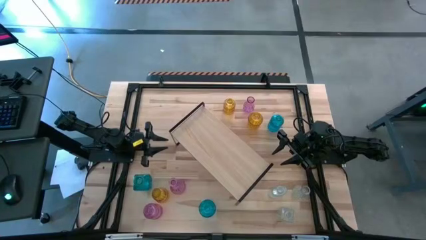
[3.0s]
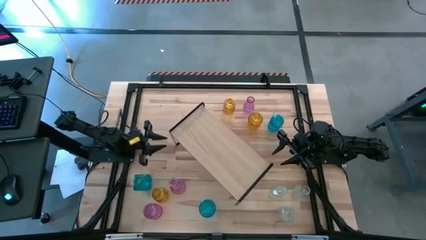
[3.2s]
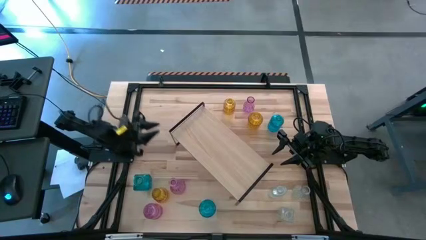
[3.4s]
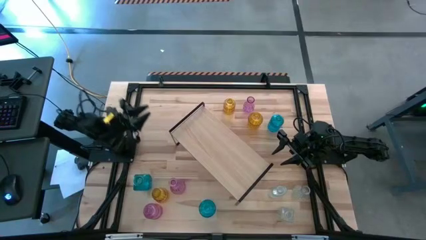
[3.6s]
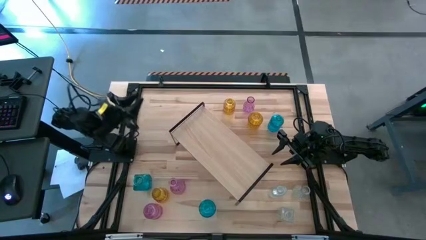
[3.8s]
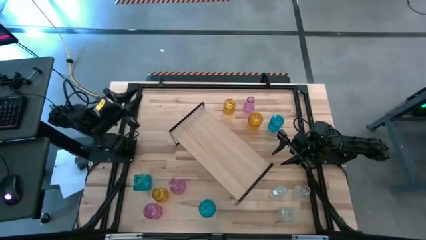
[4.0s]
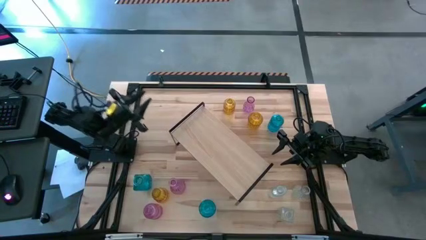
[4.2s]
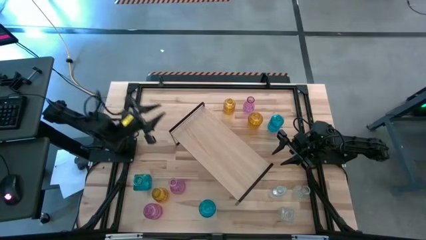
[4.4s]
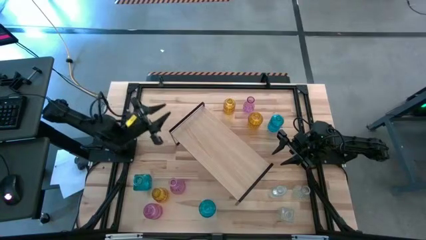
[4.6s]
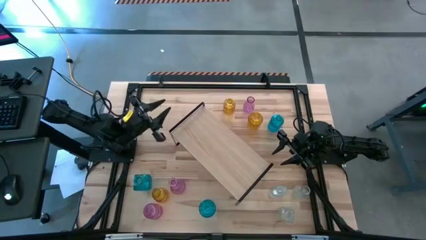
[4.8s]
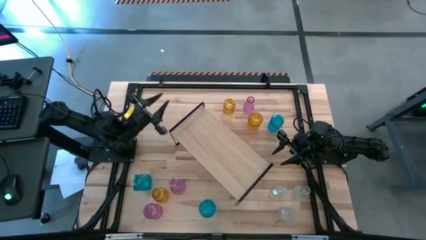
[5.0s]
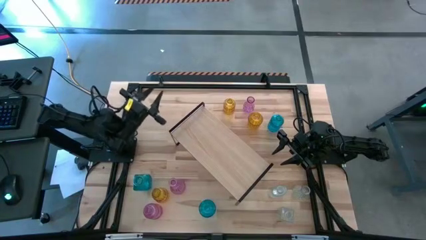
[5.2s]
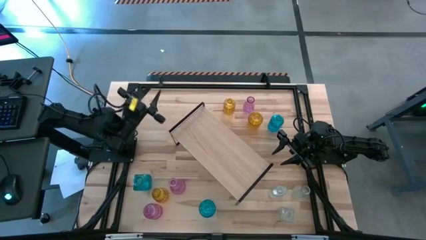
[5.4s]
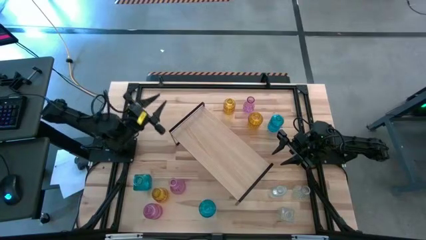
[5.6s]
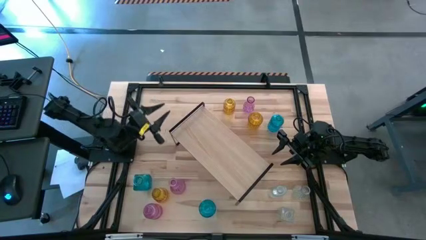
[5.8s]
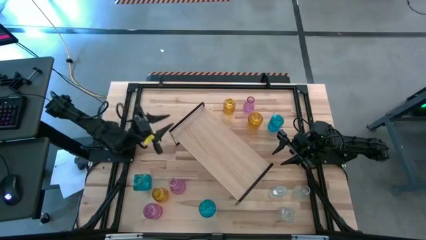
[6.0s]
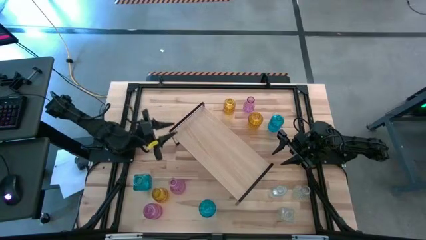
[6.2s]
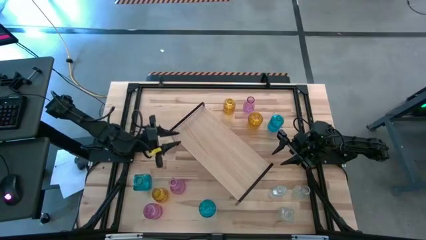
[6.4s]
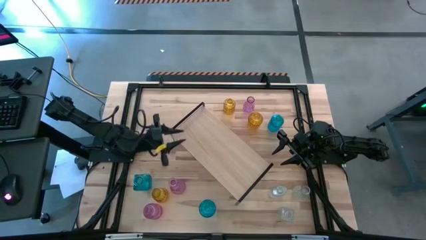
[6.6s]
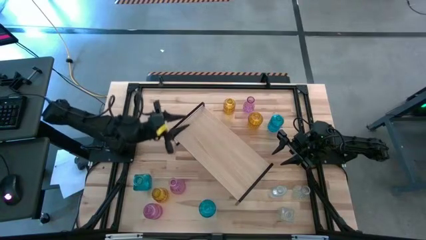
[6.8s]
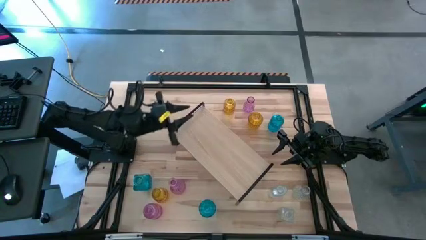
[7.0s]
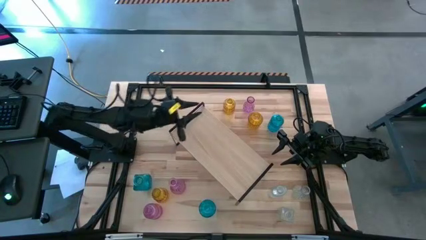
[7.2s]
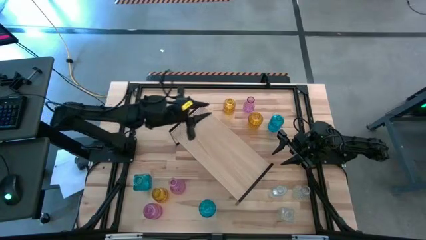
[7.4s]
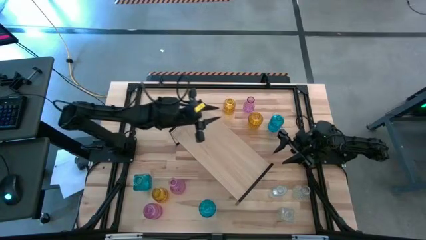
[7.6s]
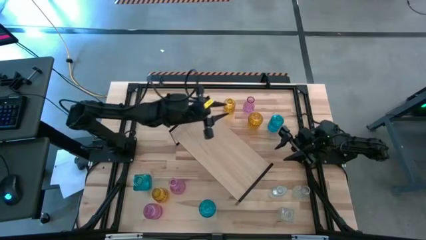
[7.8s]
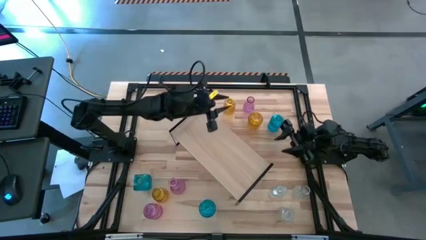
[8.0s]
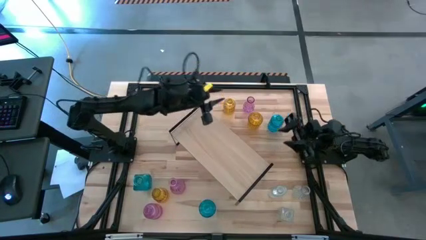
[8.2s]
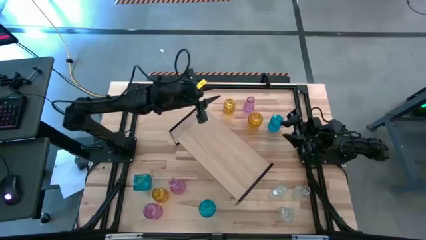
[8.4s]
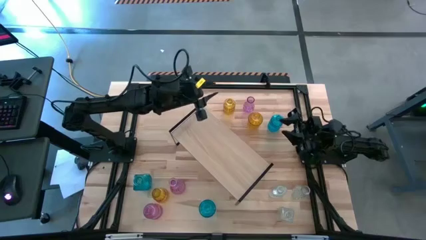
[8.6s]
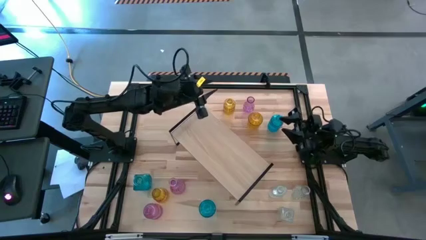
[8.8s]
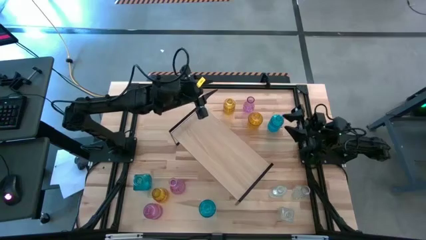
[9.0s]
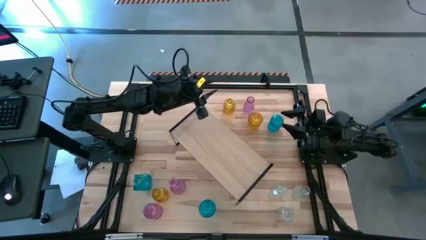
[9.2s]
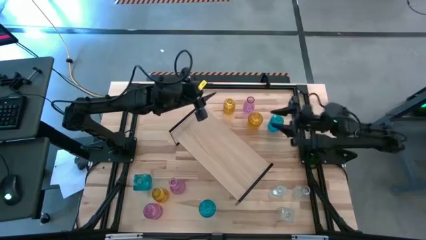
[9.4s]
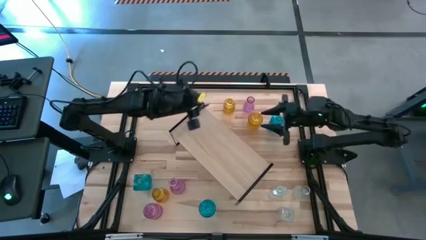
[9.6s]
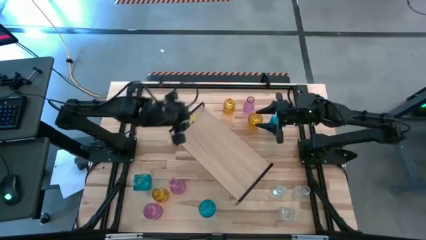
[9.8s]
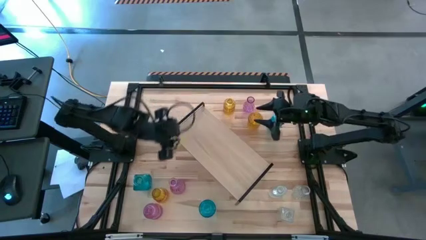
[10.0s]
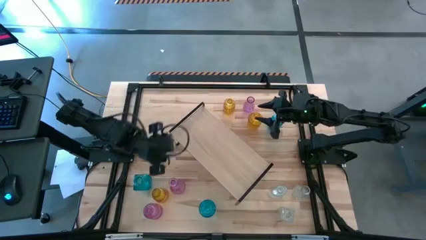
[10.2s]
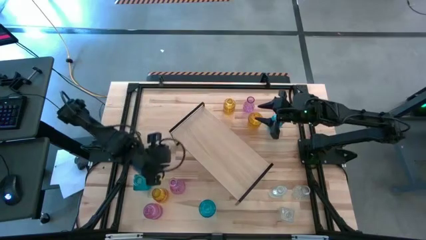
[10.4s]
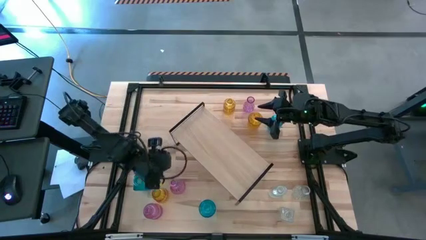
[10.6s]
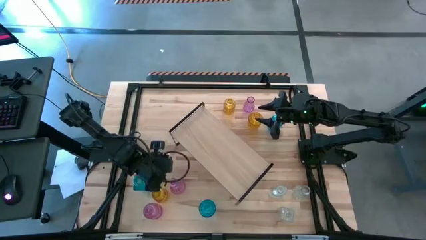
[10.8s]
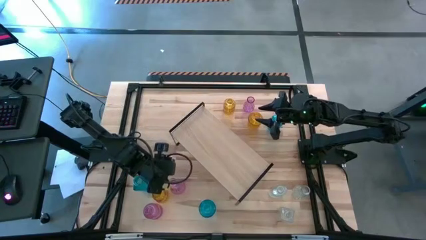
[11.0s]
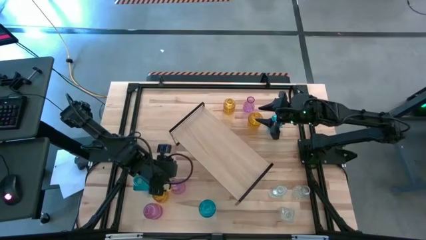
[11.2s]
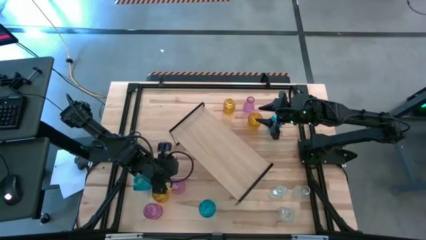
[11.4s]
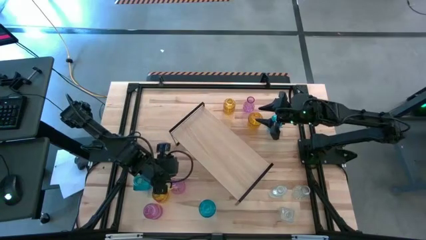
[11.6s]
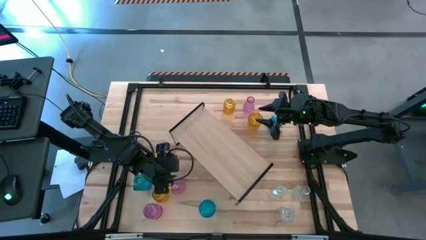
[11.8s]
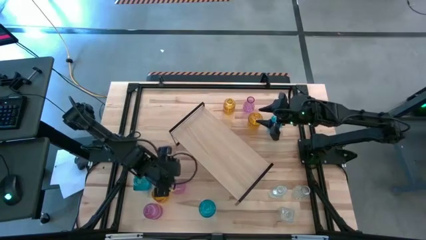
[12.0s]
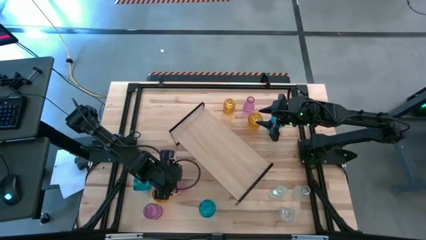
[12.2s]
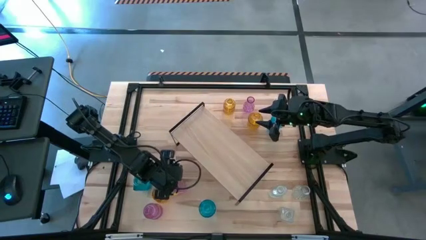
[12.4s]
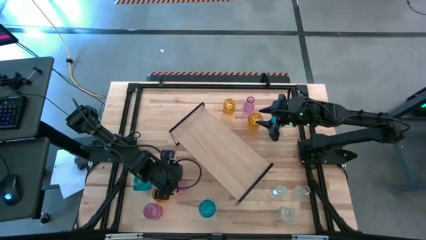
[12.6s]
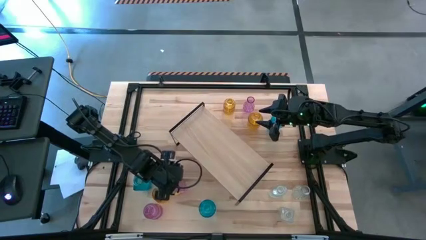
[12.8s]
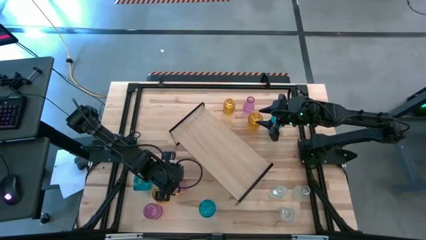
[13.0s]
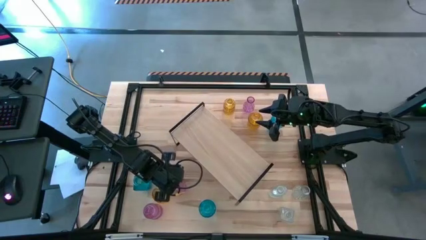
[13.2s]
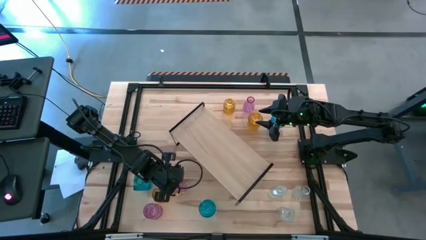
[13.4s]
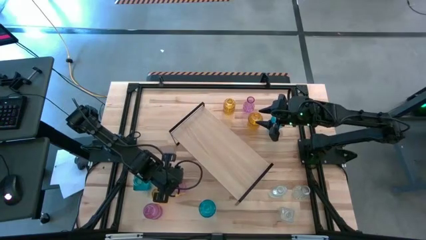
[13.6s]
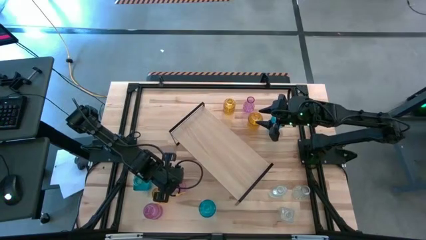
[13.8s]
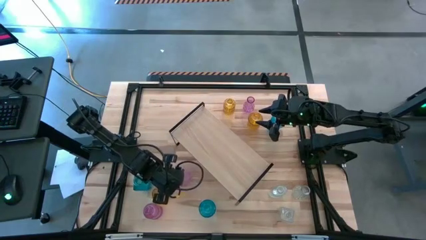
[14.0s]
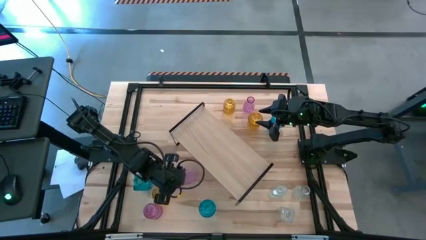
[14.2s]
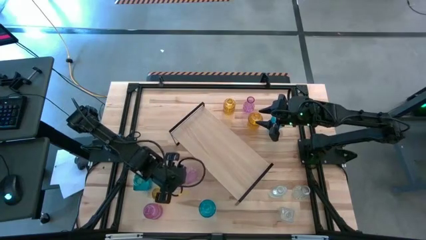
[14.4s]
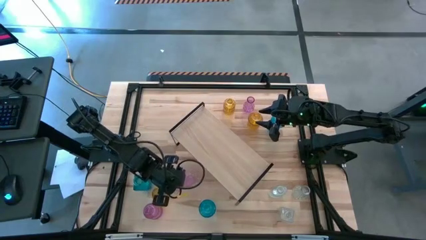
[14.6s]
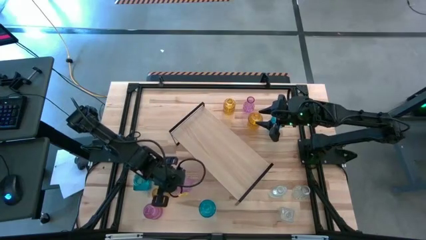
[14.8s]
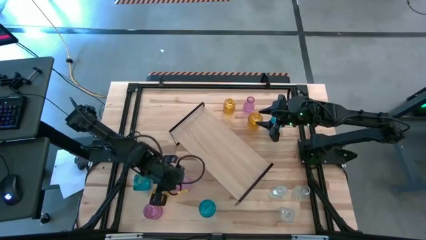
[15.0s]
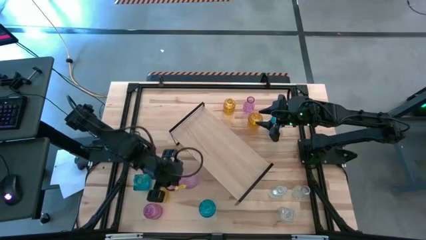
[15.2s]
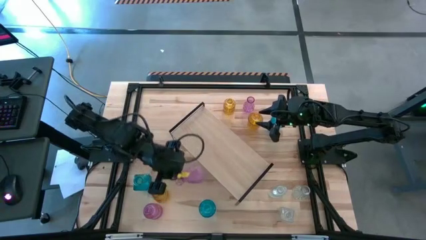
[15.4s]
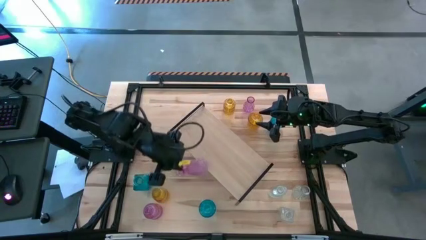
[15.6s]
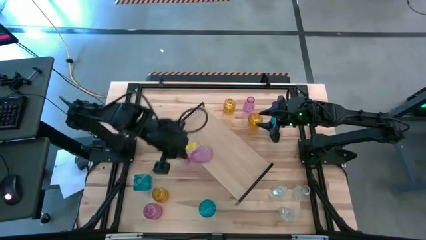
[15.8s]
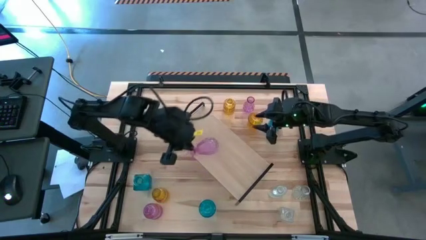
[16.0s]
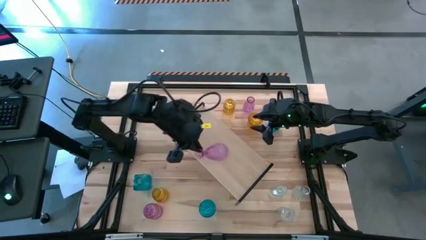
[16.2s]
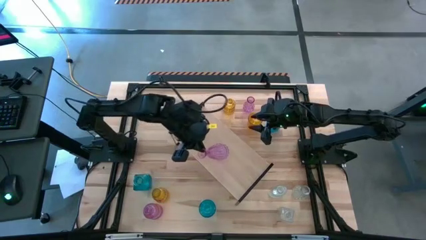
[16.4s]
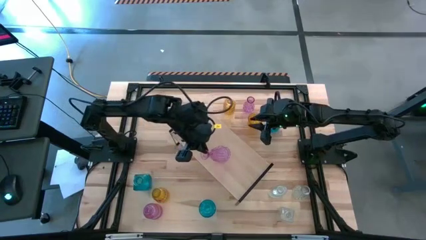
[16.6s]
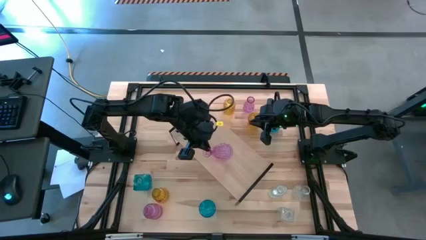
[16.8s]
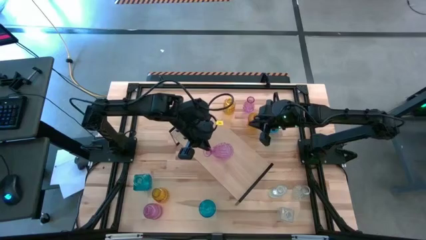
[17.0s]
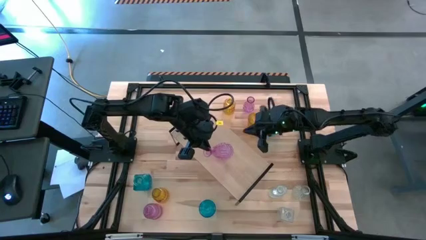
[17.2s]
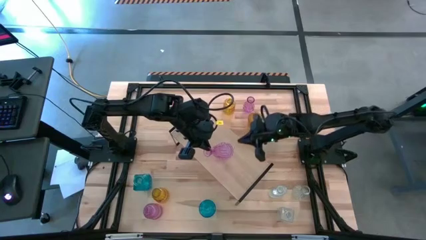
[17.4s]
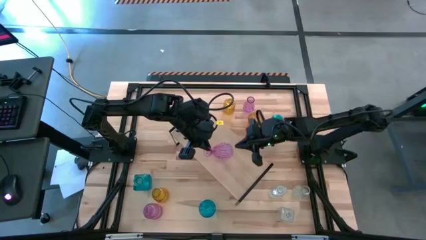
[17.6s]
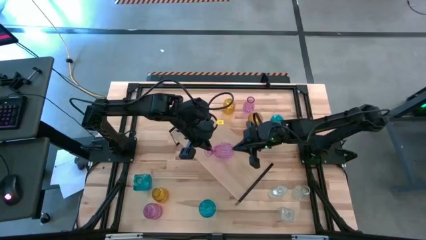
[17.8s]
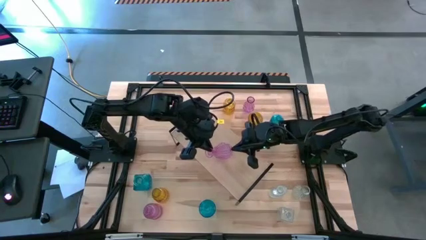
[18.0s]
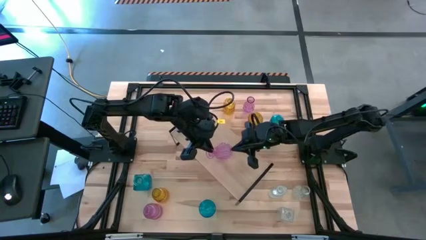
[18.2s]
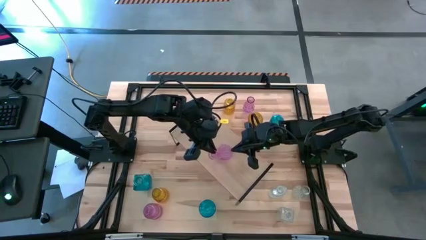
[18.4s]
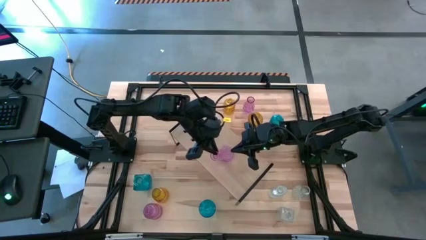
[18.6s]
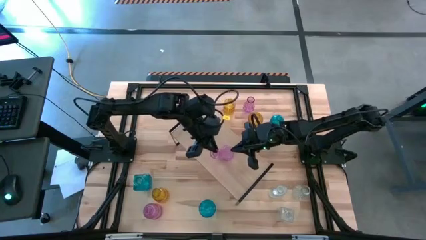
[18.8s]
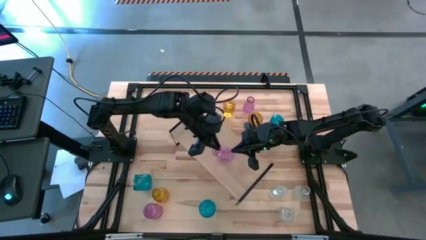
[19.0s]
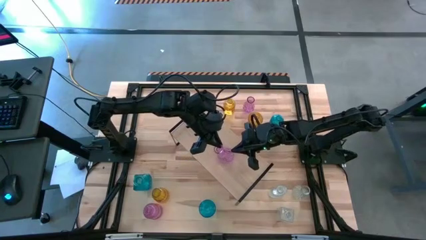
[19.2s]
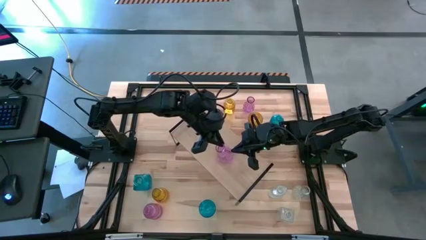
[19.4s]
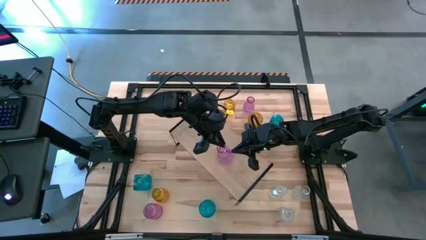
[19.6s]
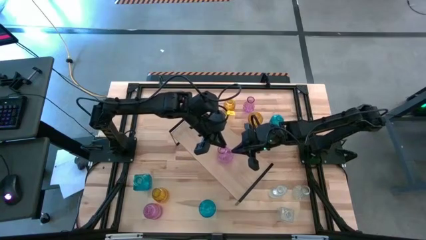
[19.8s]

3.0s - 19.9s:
Task: sort vases onto shelf
Put the middle pink flower vase on the shelf
